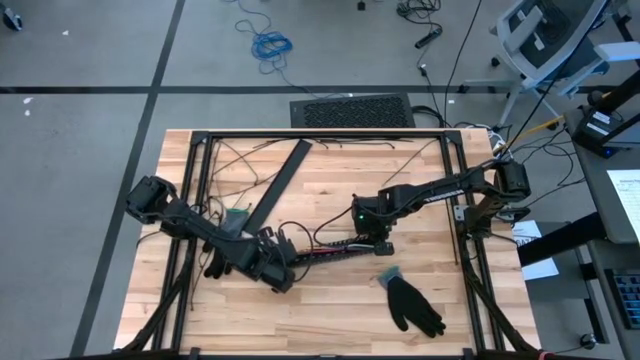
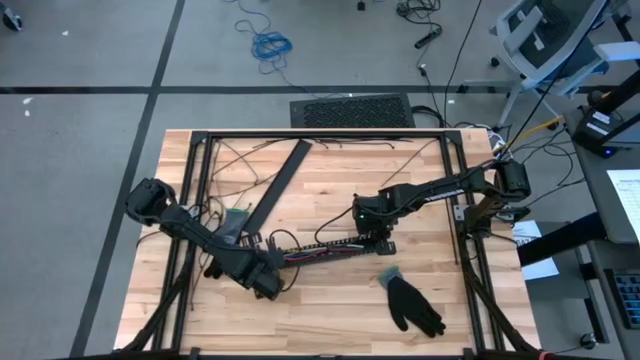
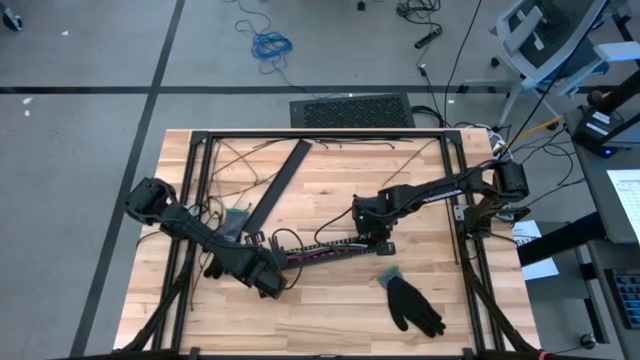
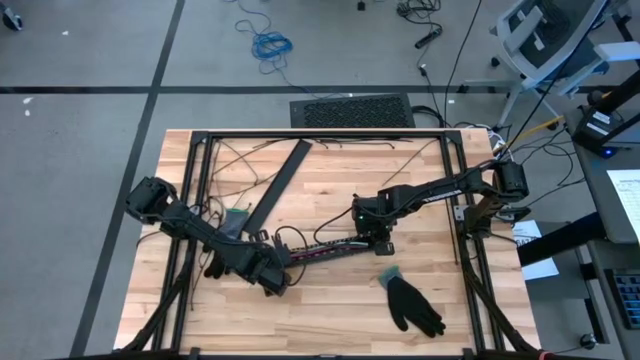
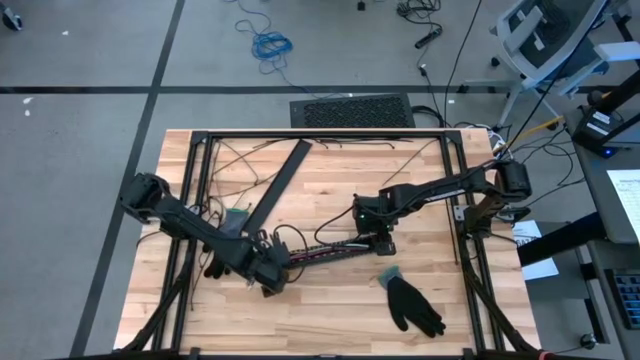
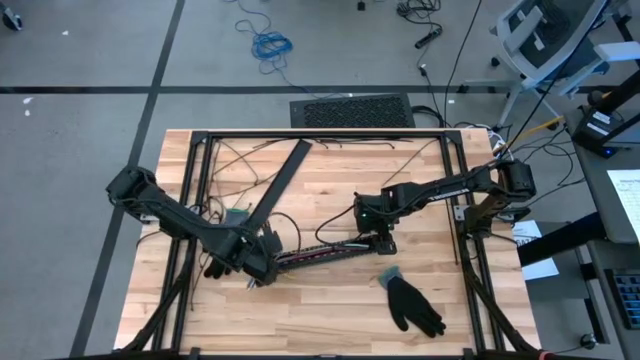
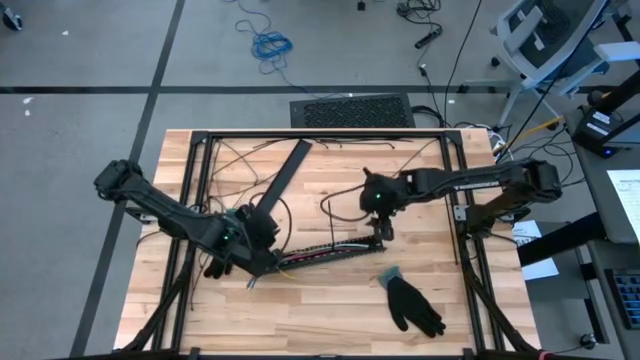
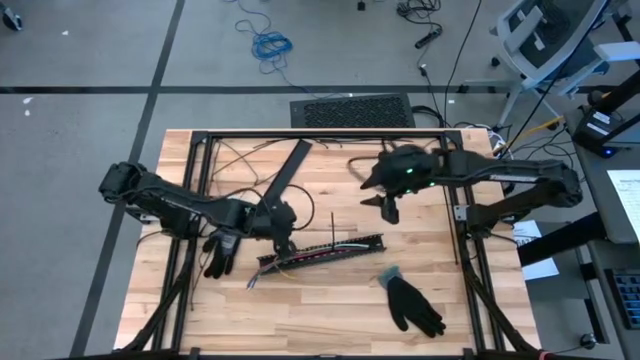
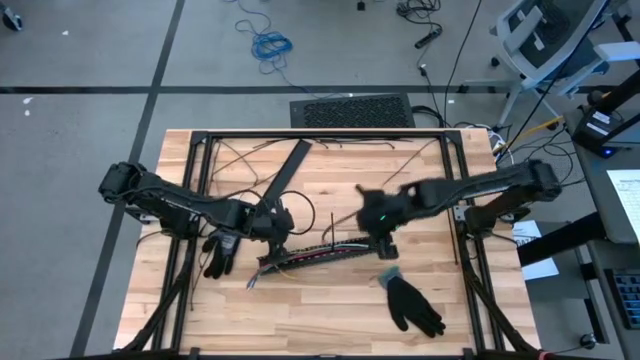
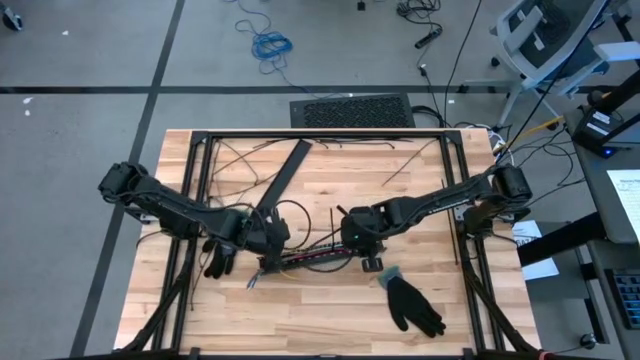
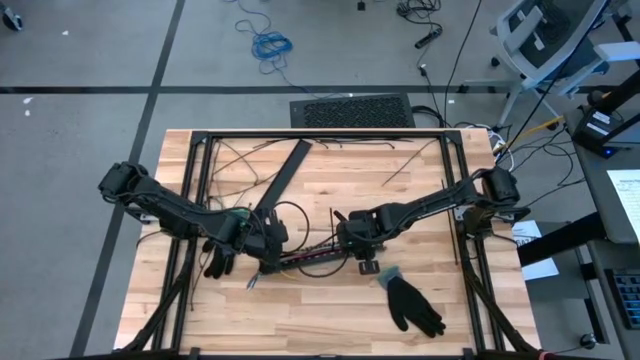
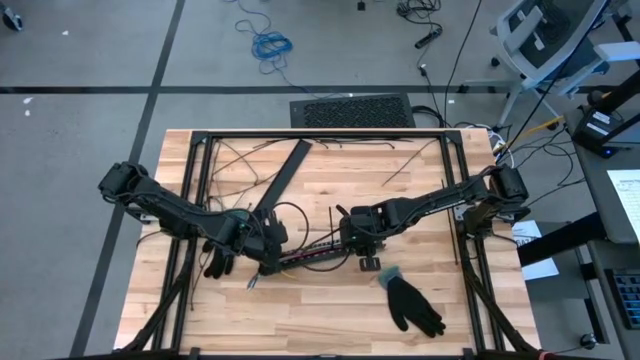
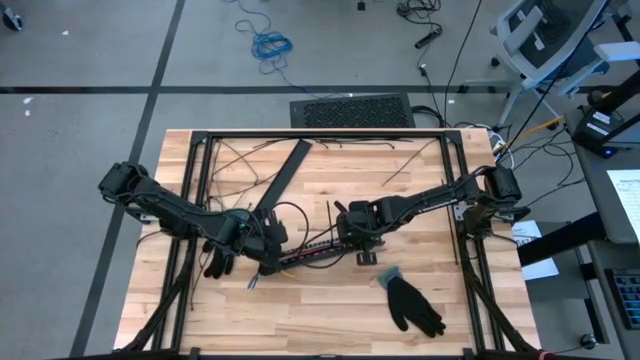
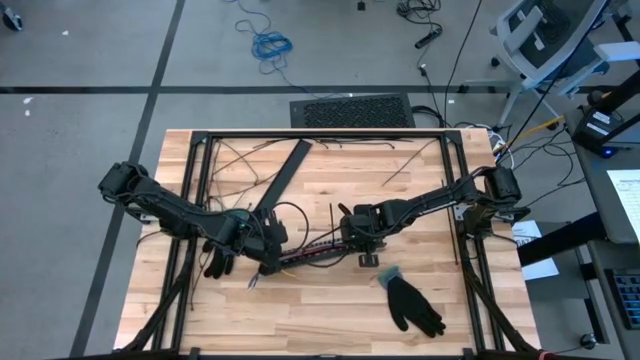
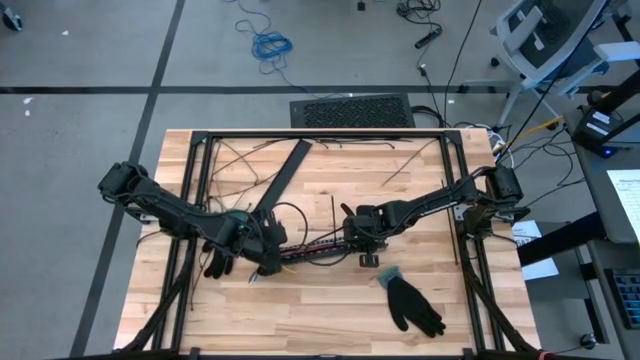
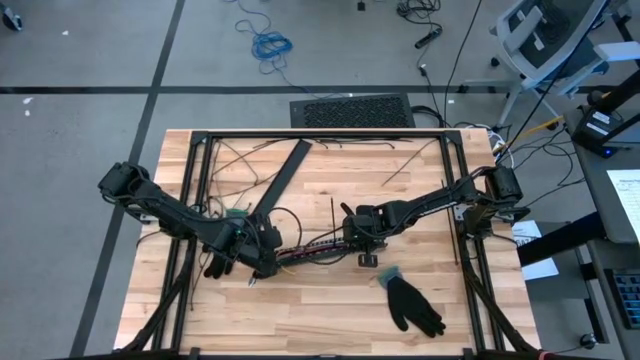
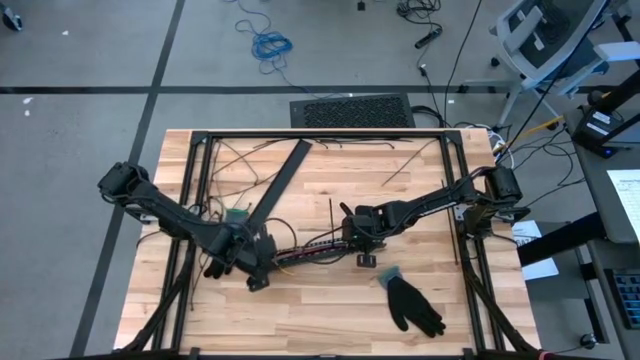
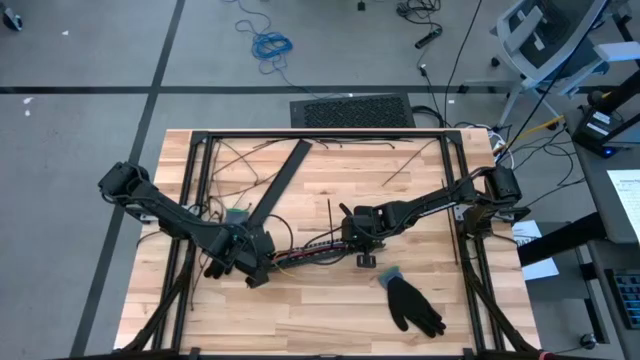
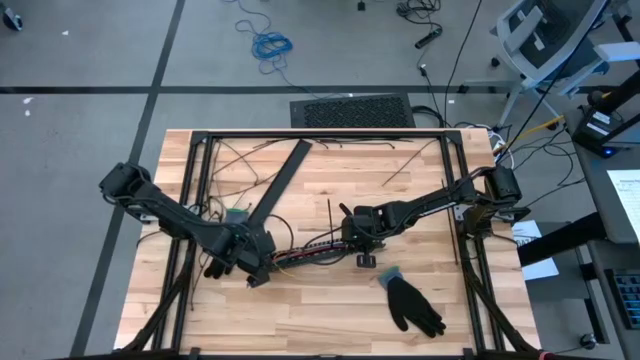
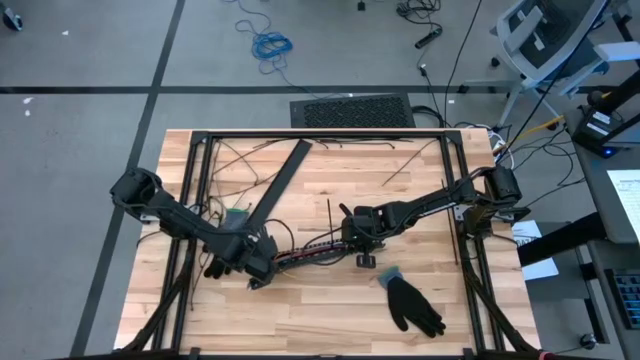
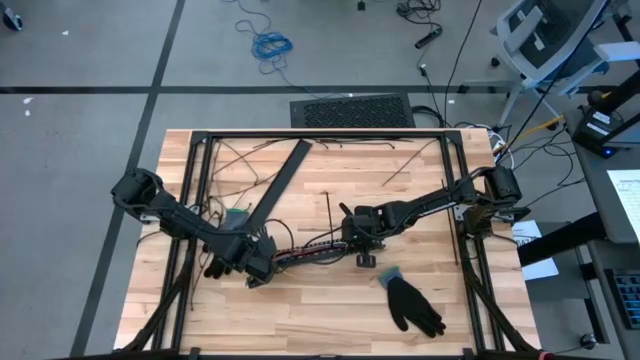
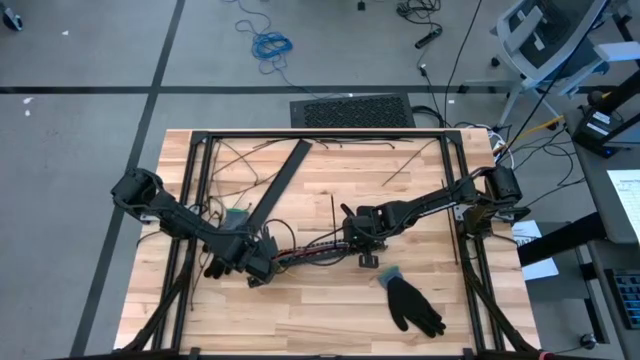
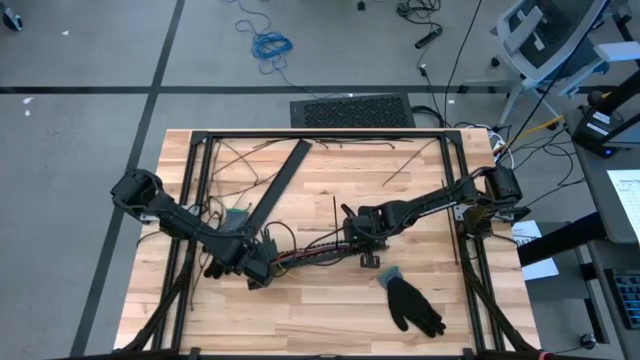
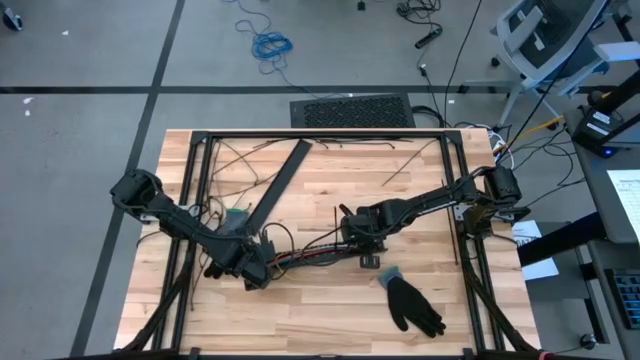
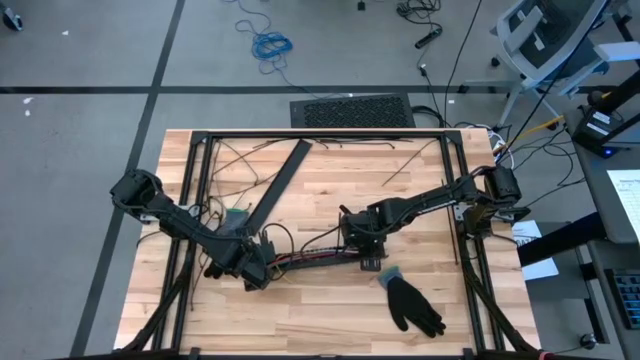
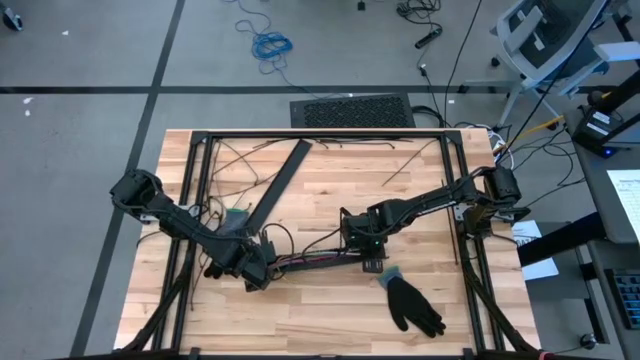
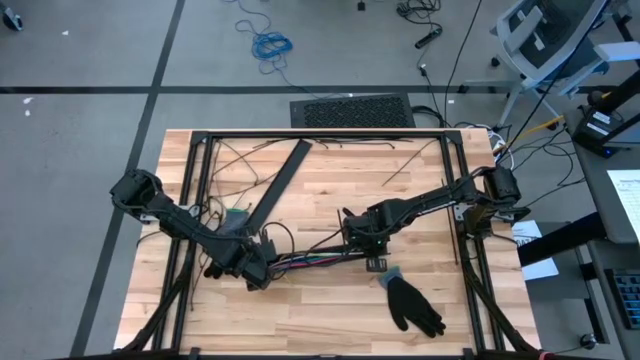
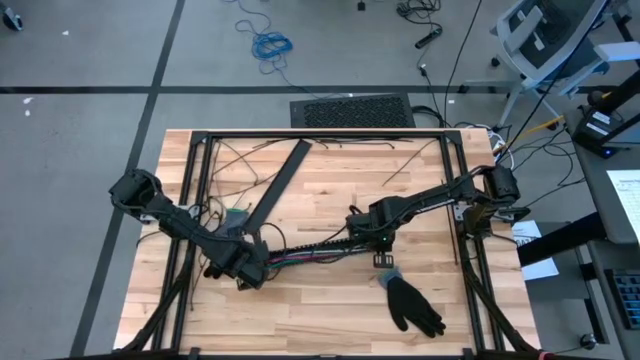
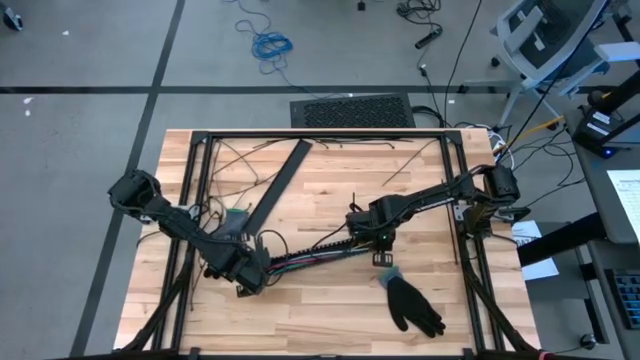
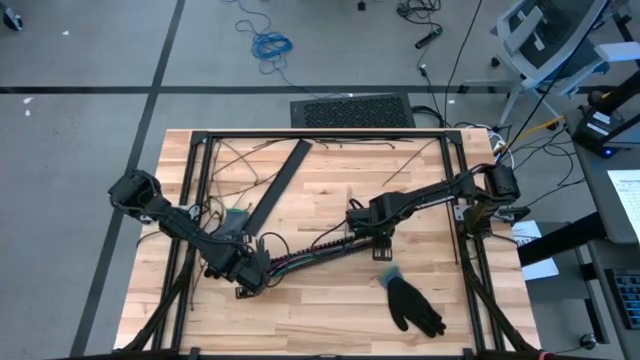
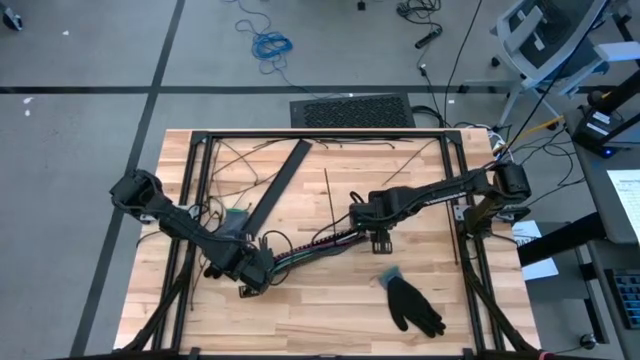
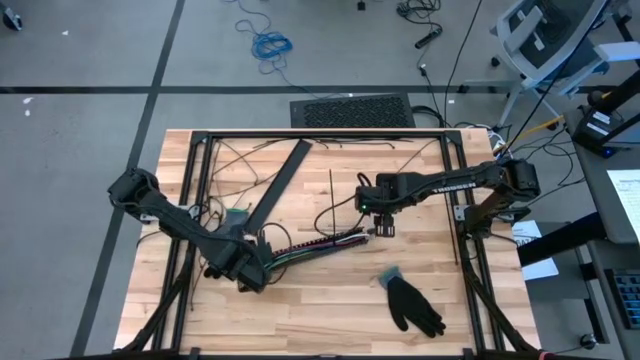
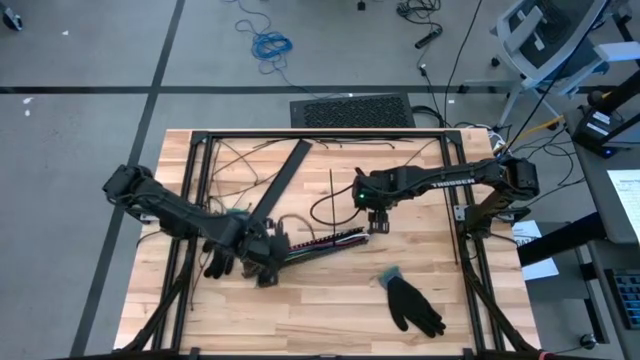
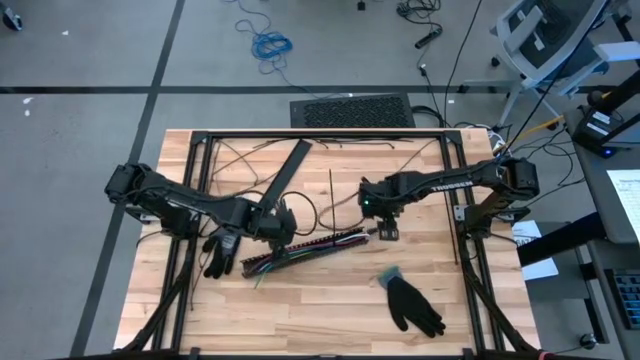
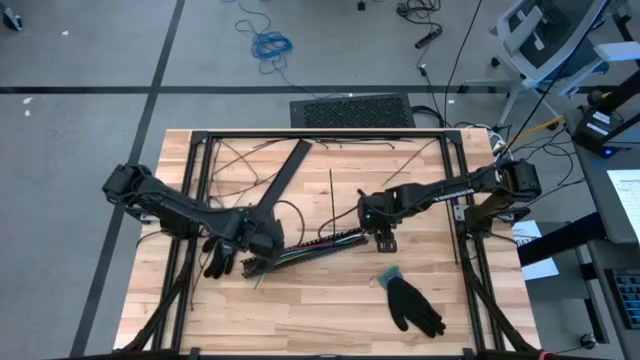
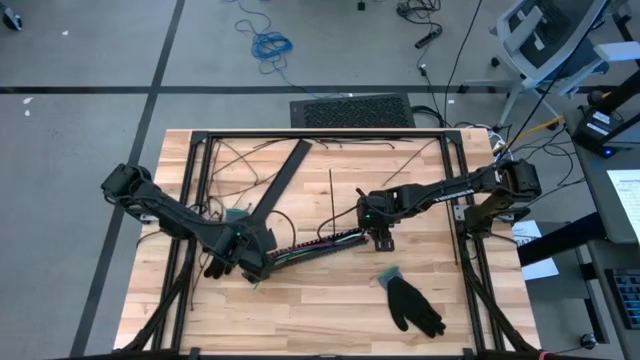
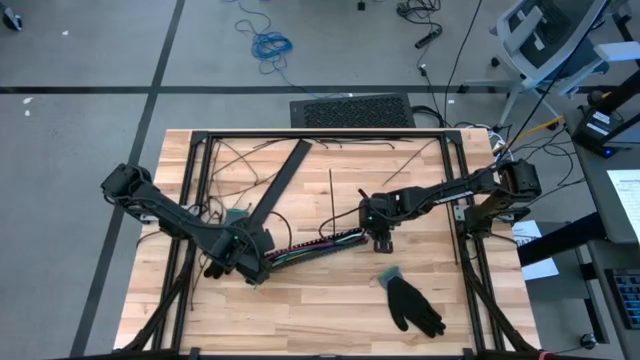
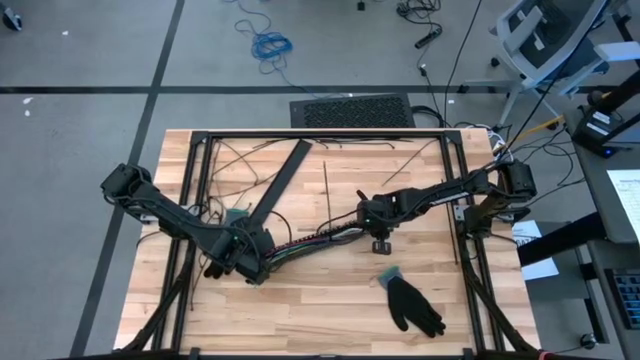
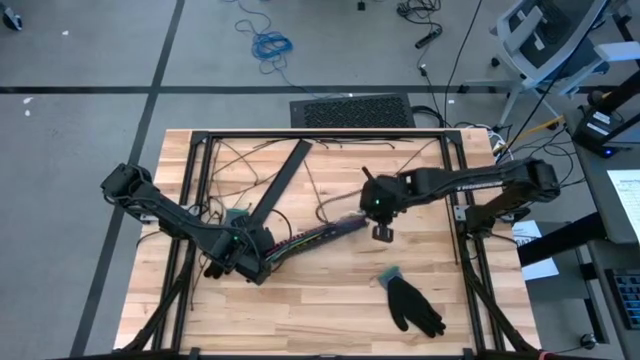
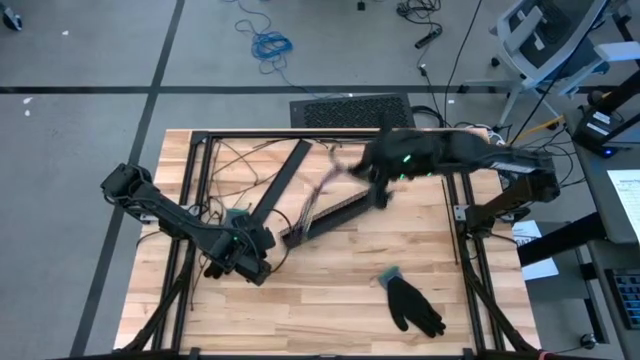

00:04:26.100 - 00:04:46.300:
Task: Ziptie cables
Put the ziptied cable wires into the cable duct
